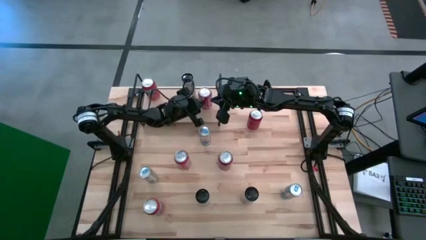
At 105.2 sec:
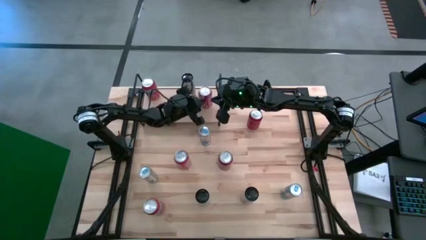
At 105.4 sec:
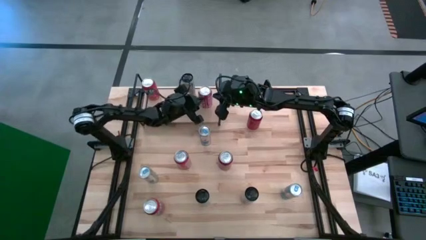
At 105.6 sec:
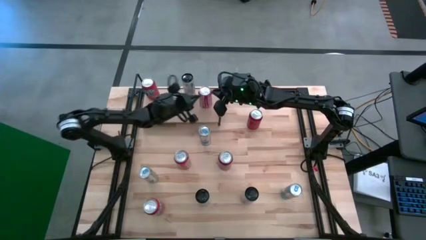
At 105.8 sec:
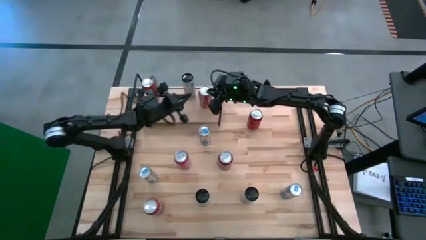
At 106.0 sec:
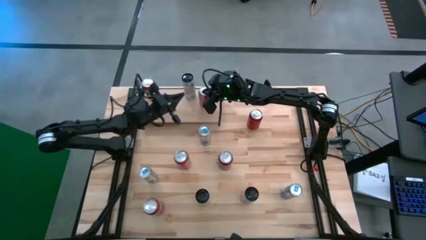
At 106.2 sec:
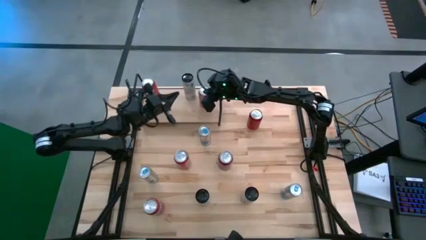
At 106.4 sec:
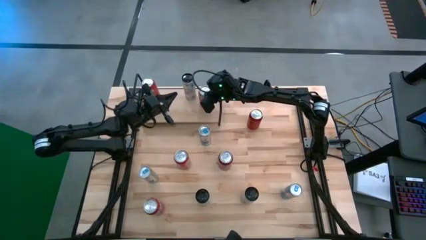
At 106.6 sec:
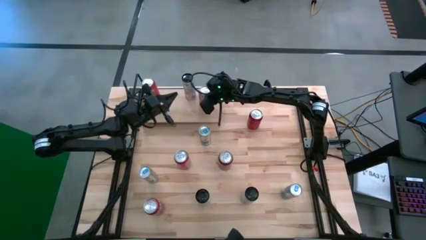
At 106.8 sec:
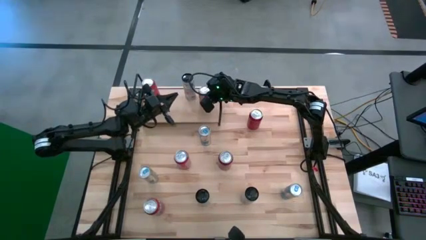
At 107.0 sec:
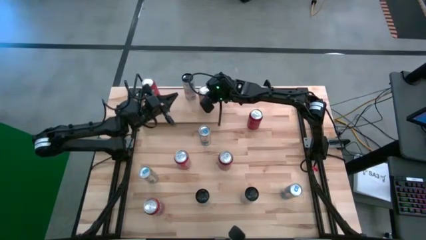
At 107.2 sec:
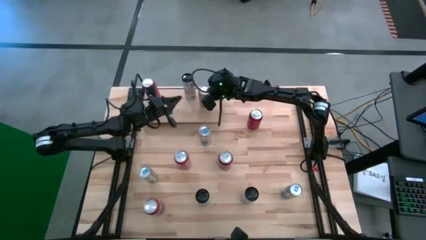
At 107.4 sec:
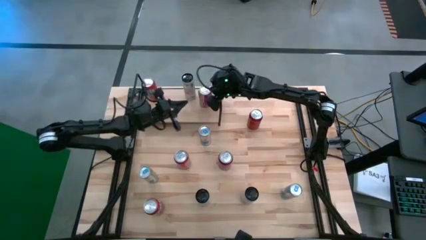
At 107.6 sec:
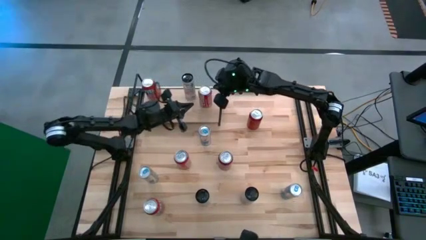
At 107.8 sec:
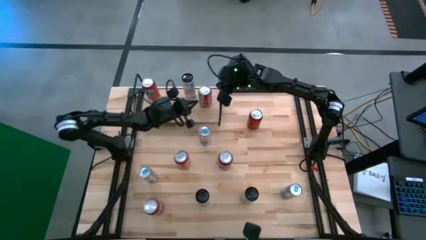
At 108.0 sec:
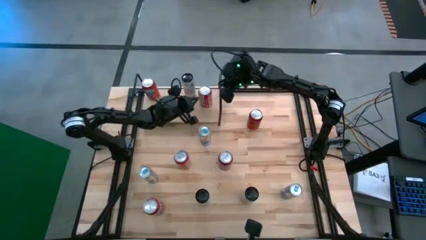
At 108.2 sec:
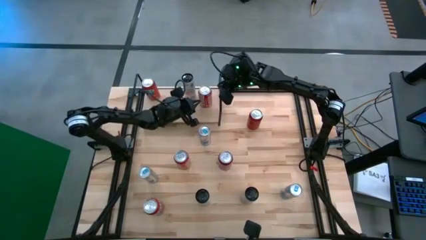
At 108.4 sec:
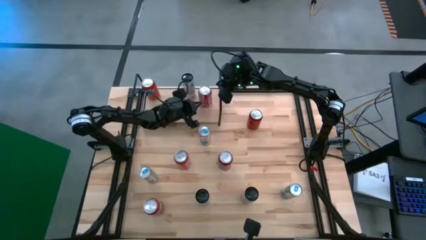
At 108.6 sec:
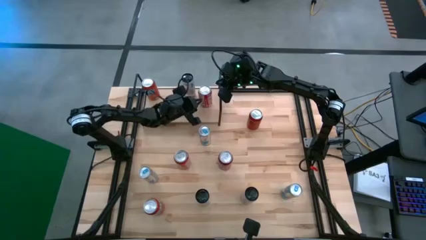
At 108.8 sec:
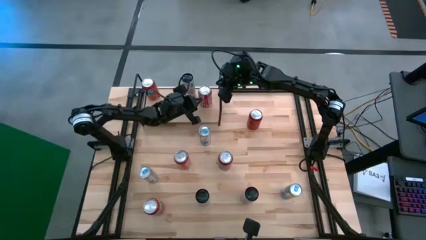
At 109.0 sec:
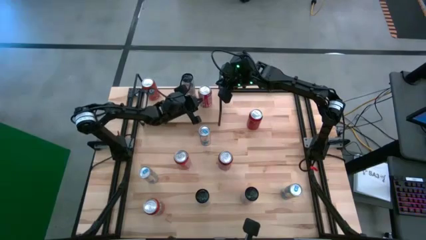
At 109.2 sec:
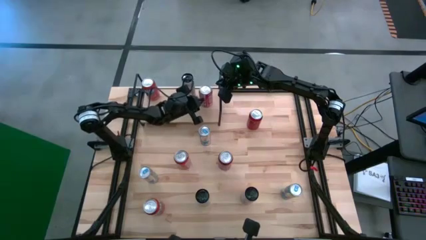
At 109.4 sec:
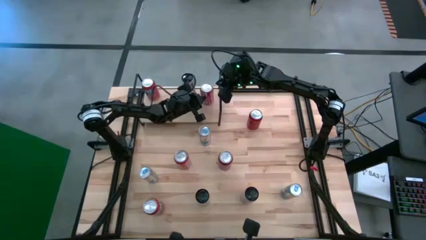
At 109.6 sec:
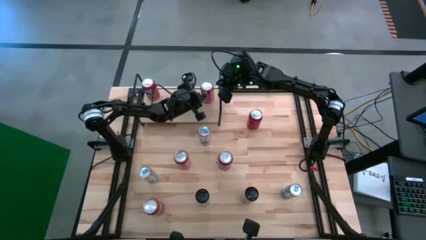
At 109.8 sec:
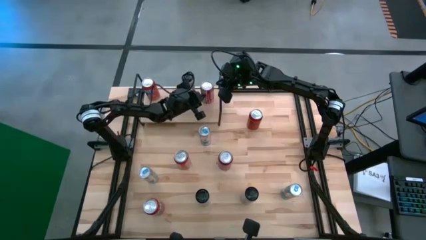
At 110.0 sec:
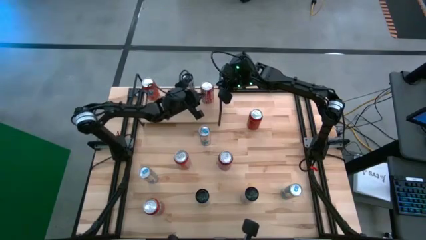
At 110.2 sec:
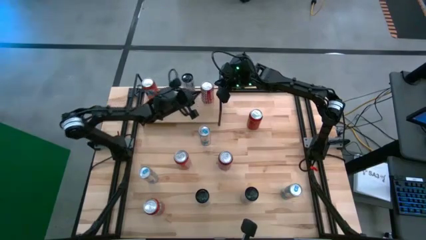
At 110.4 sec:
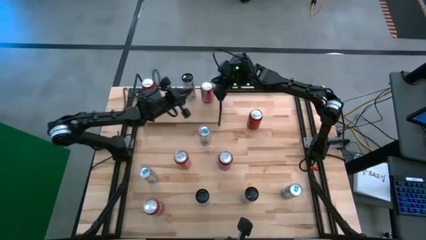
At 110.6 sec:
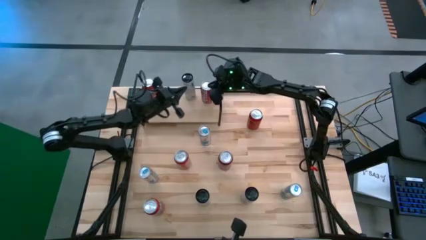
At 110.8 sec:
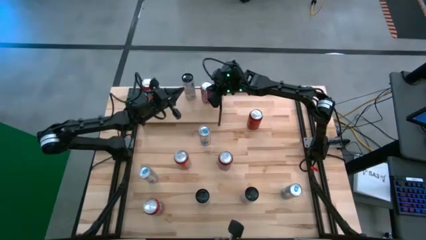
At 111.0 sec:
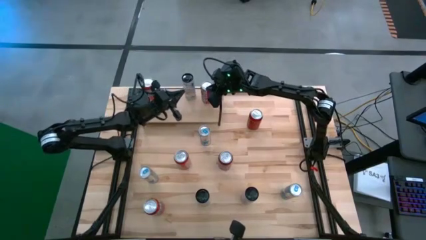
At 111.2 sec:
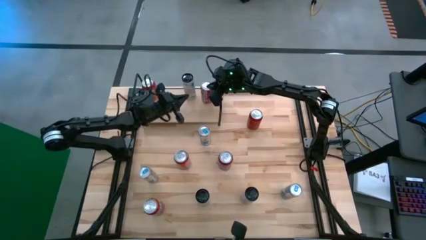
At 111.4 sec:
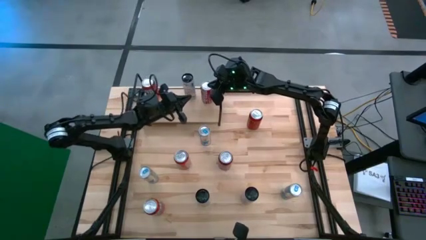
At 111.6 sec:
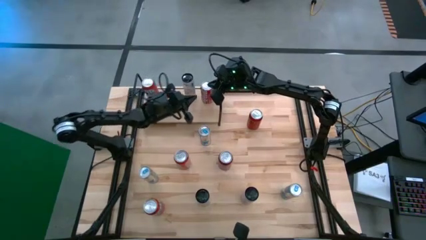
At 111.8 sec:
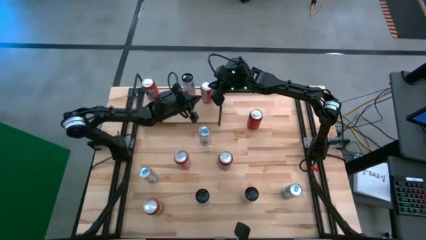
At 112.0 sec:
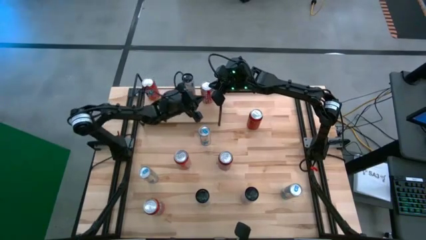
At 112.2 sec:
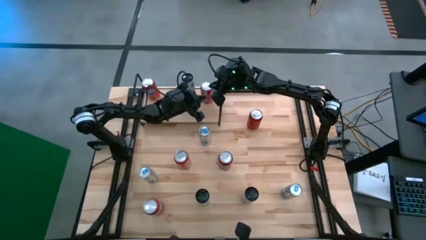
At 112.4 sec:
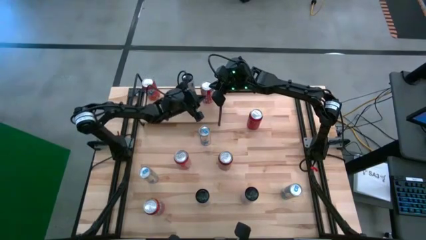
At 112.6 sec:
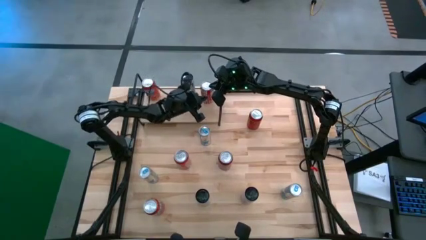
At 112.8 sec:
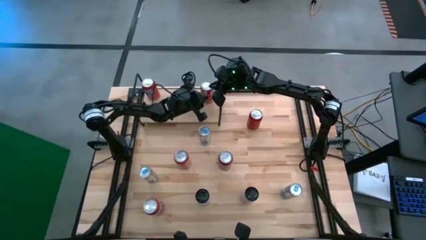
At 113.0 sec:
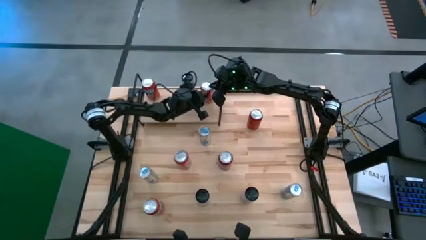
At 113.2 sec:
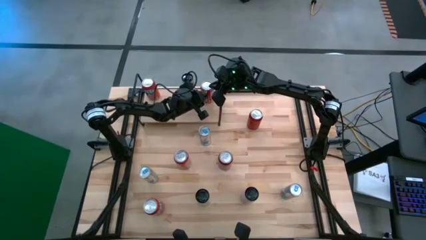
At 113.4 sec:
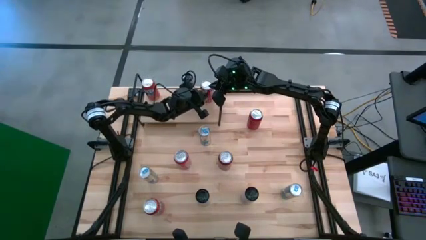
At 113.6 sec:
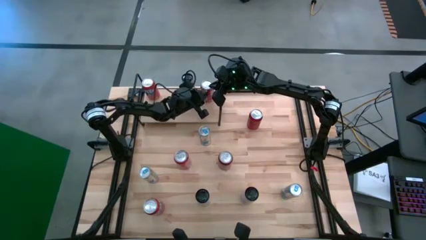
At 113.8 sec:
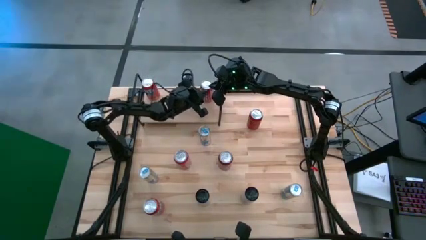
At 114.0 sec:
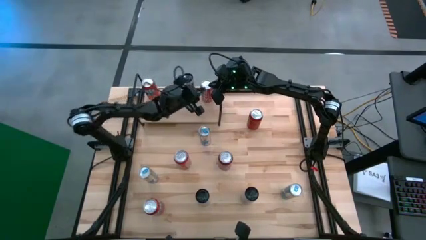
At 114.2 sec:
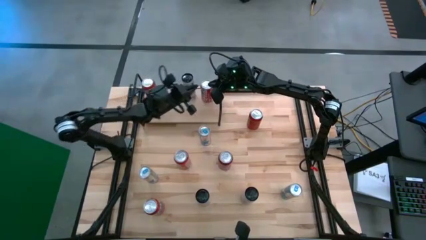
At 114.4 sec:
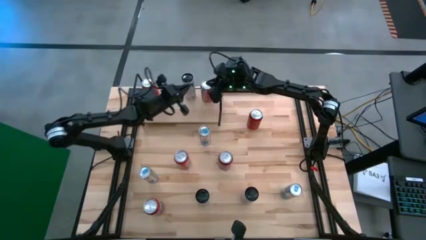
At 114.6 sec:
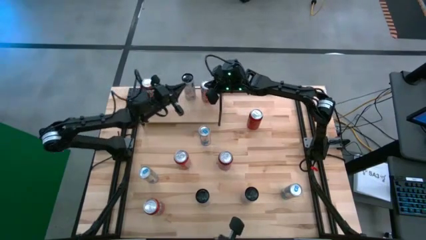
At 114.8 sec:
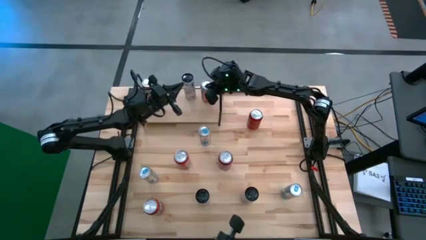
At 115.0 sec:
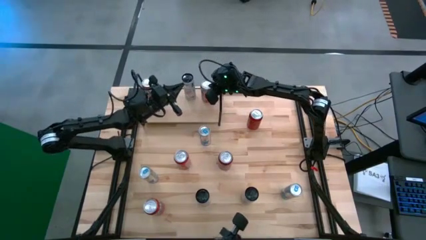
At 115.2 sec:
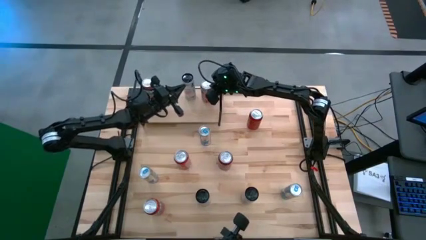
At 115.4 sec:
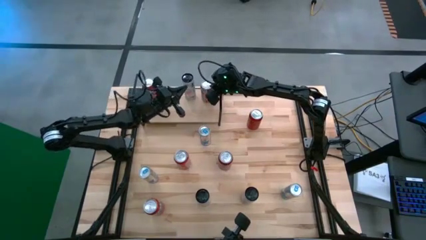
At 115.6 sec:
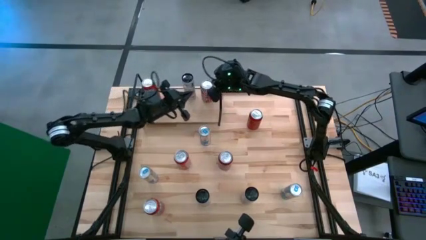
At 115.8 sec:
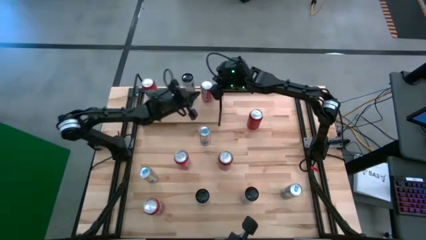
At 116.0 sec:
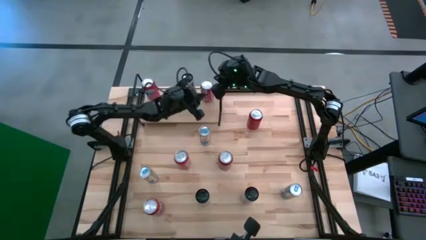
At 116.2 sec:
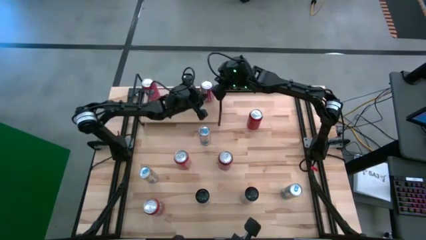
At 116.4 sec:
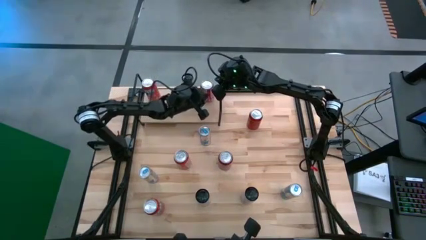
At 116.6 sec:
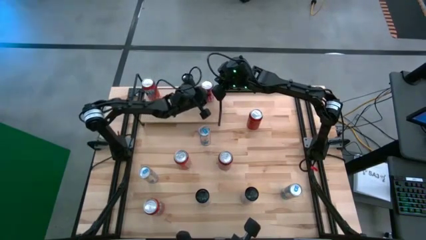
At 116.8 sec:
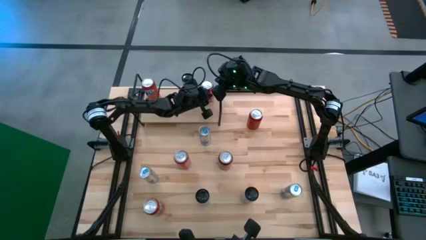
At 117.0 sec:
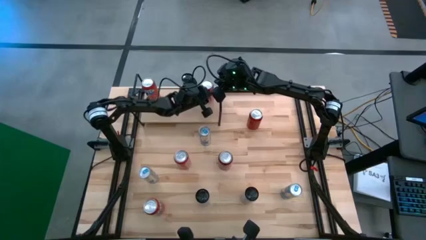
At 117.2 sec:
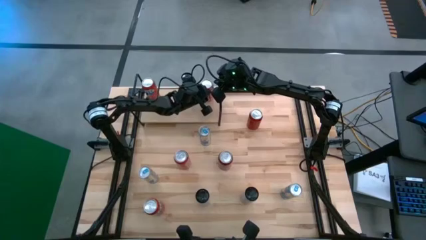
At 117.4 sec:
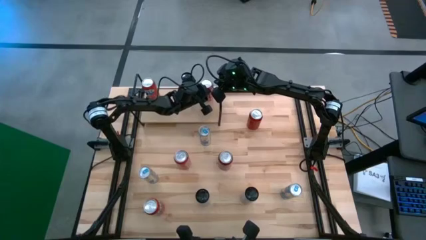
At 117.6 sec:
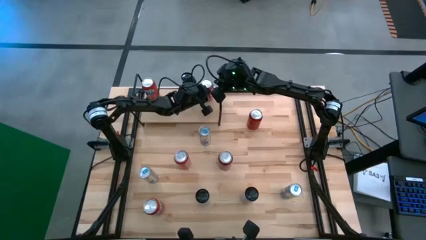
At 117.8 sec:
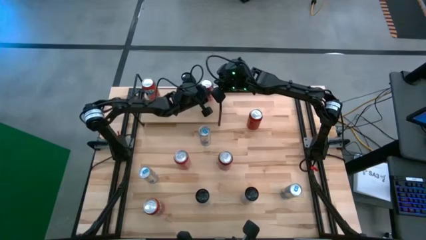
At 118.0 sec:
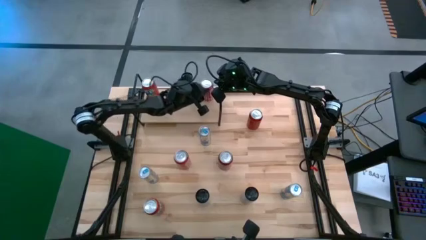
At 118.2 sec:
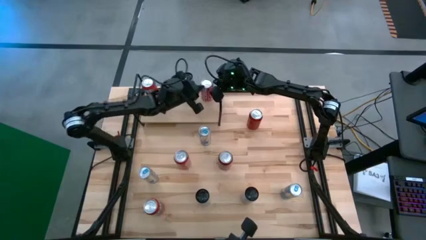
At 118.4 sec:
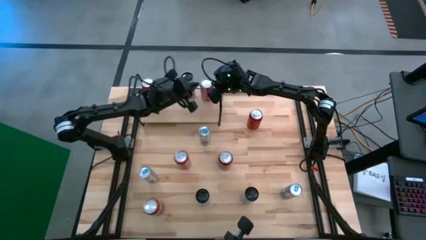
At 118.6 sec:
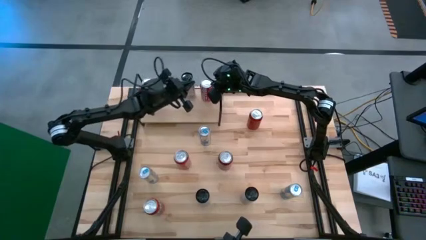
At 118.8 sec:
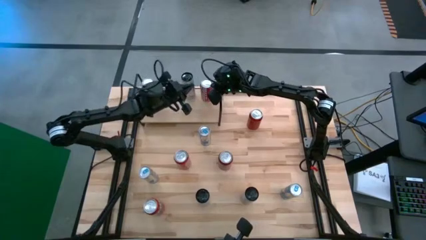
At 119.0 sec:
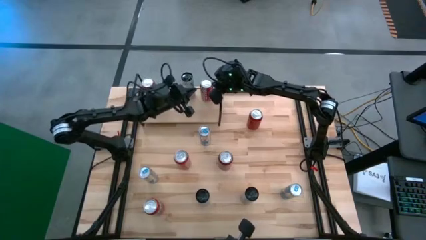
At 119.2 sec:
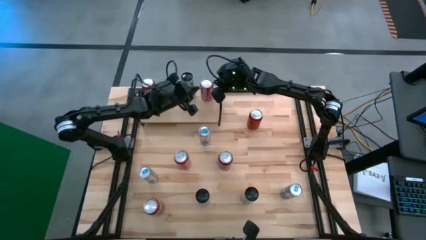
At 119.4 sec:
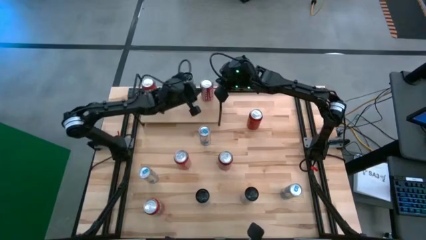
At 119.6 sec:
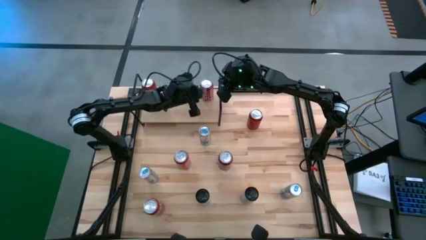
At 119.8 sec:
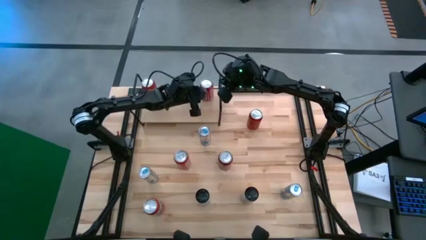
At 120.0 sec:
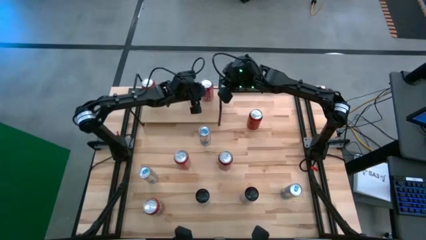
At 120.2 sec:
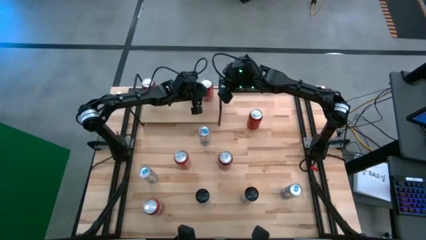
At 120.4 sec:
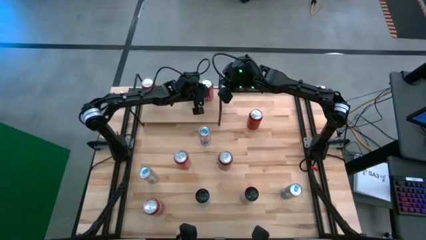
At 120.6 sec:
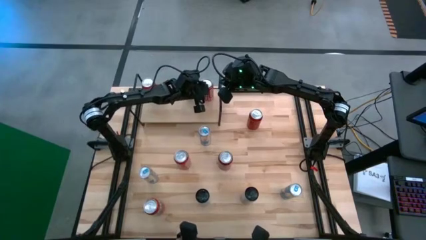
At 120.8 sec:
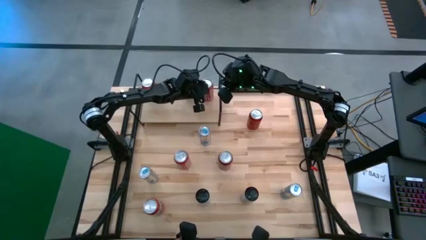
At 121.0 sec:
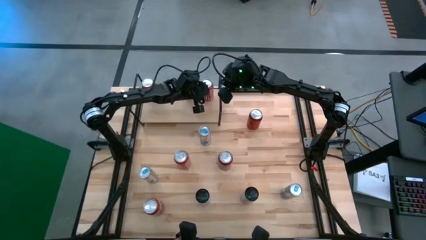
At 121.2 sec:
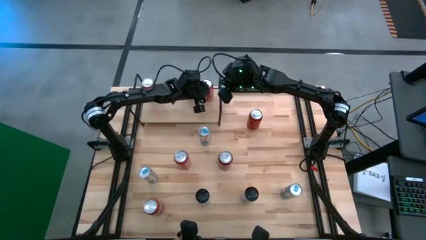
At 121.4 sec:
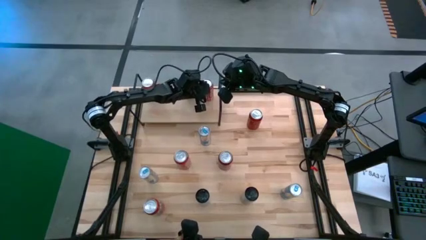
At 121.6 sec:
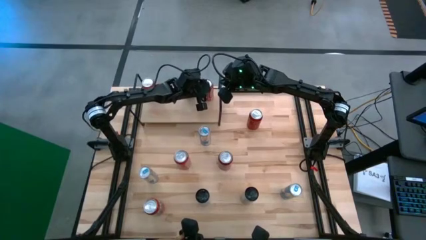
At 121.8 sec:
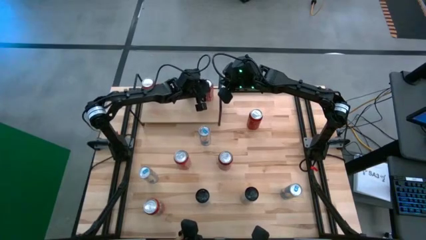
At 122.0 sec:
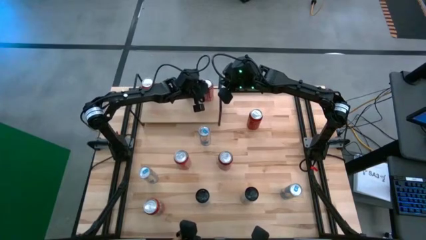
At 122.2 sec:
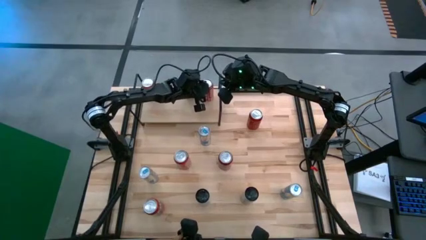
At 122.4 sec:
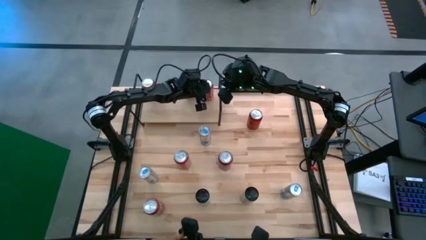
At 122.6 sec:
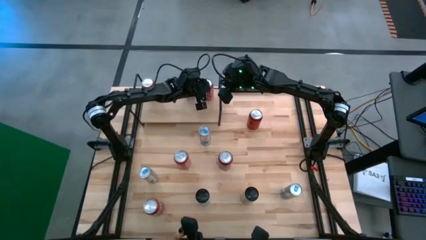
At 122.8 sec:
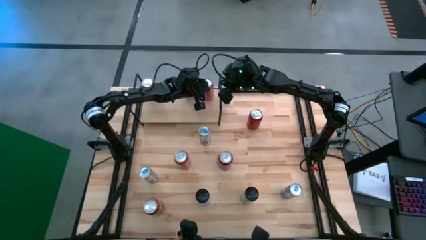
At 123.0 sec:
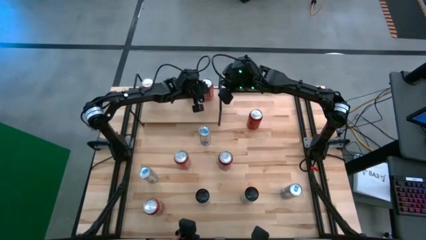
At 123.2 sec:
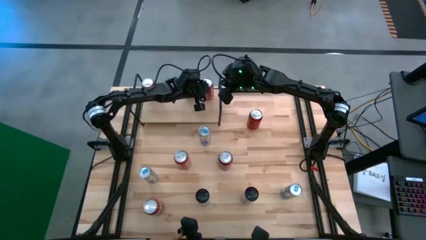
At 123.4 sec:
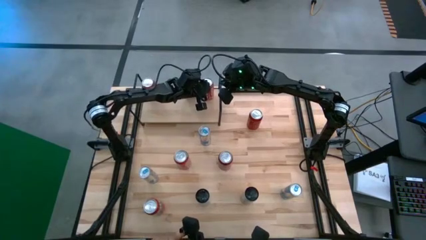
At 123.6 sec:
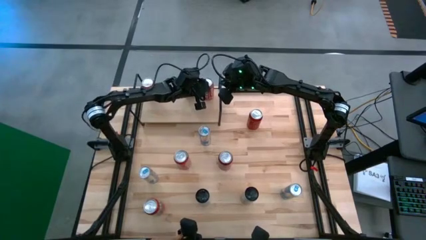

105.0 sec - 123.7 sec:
Task: Place canned beverage on shelf
Put the red white soda can on the shelf
